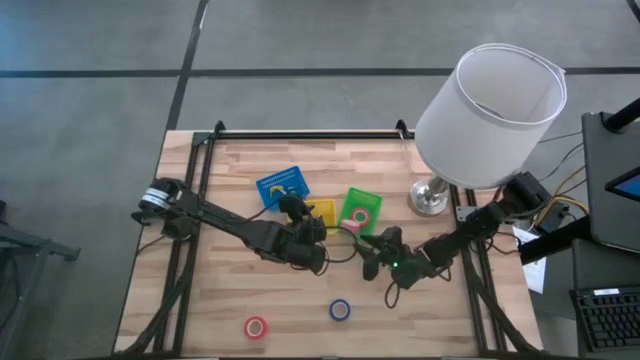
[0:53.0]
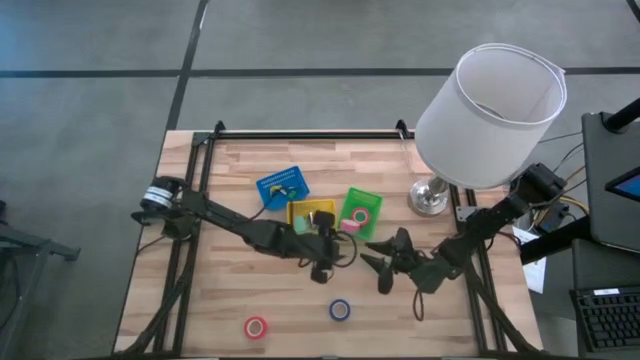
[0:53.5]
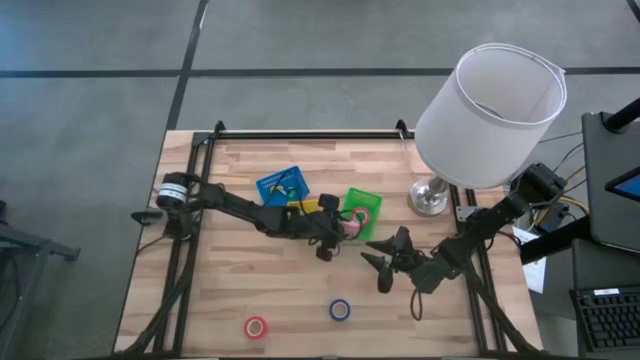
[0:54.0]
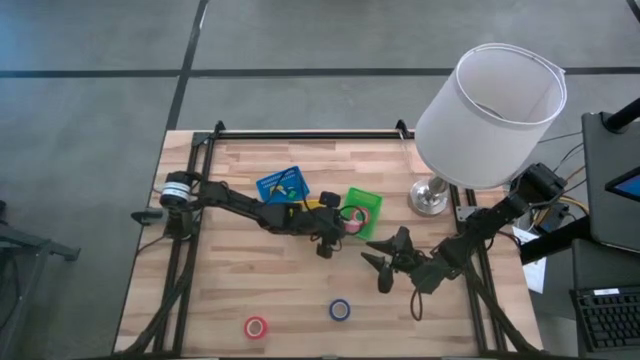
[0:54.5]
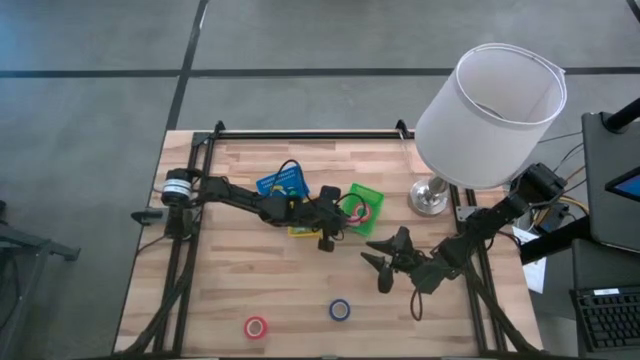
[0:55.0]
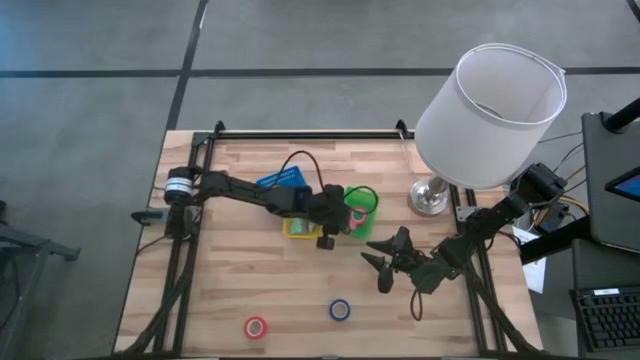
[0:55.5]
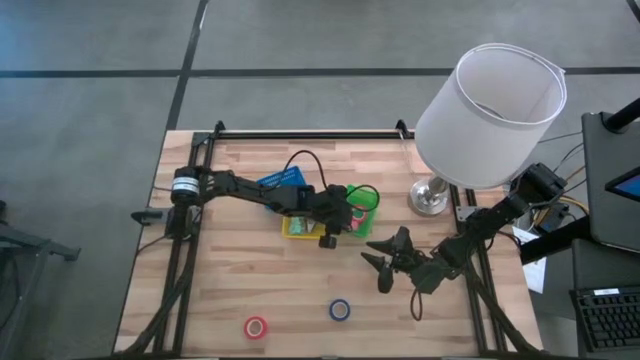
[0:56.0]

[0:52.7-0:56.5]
Task: Pick and place Stapler, Stapler remover, tape
Adjust the pink tape

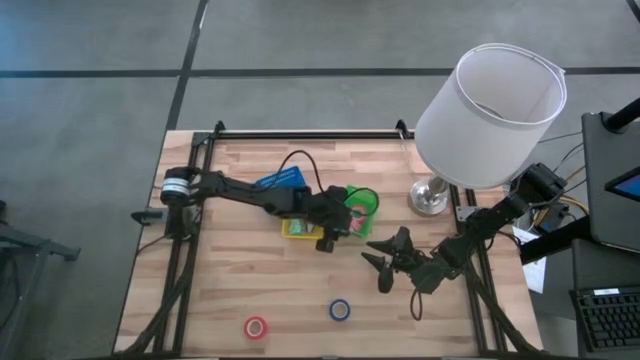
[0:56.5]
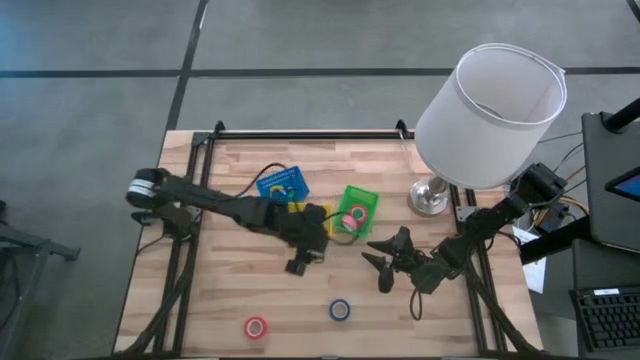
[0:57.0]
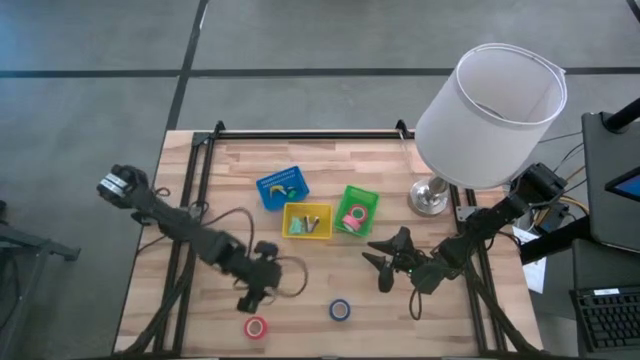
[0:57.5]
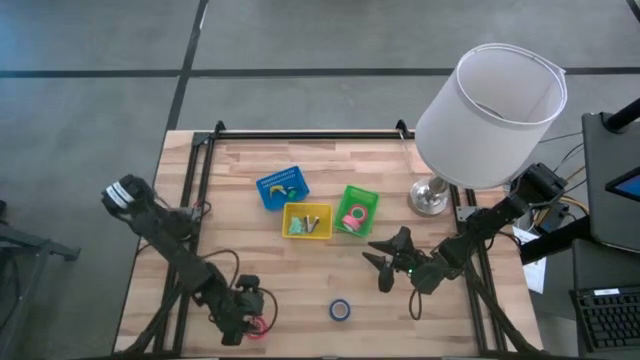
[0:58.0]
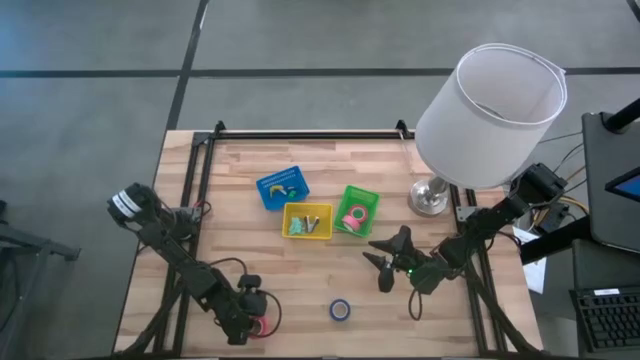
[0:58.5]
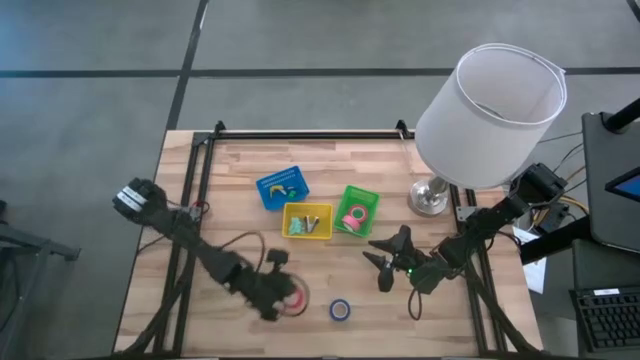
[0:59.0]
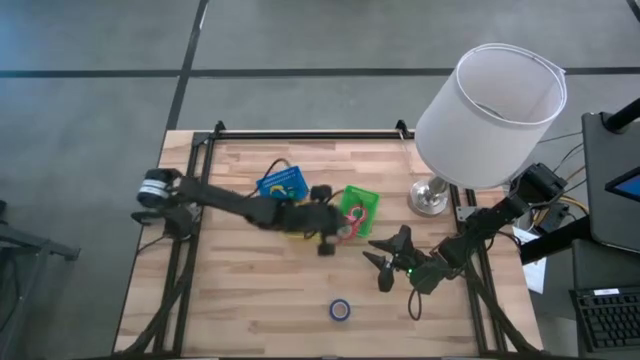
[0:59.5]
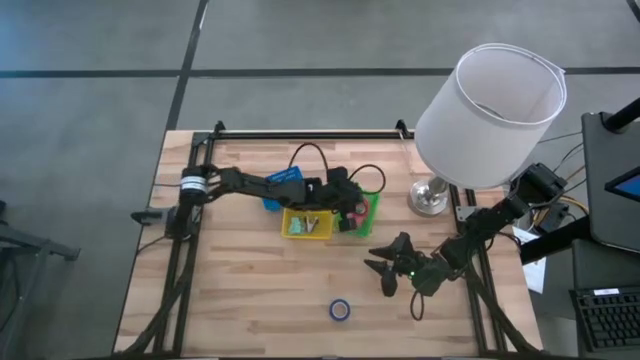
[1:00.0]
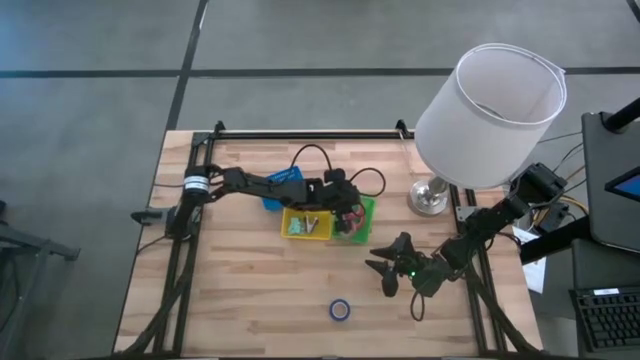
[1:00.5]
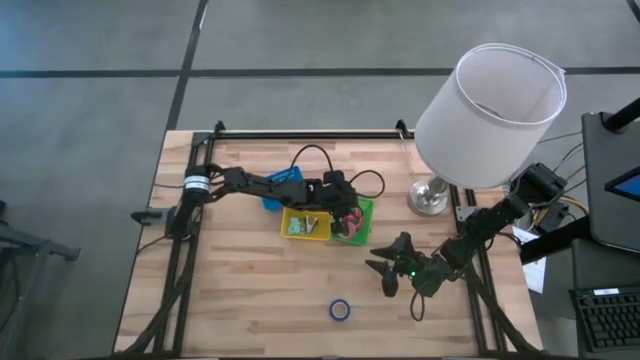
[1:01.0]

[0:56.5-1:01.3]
Put the red tape into the green bin

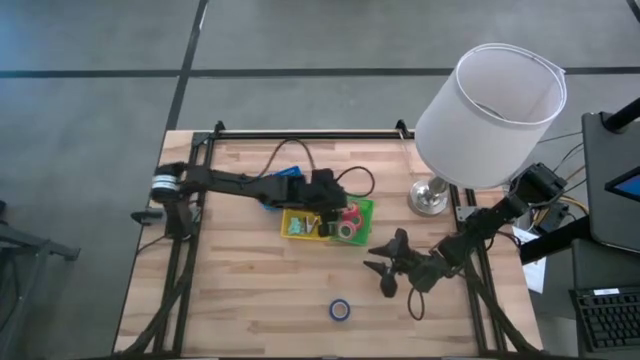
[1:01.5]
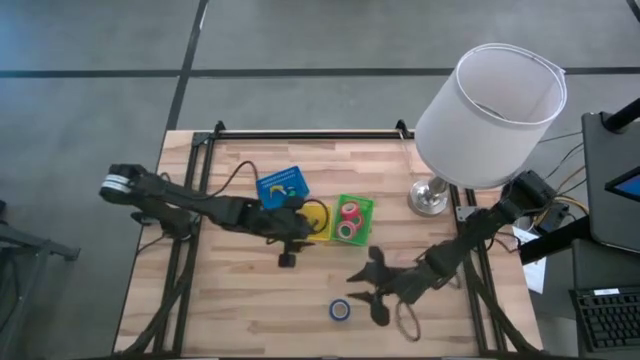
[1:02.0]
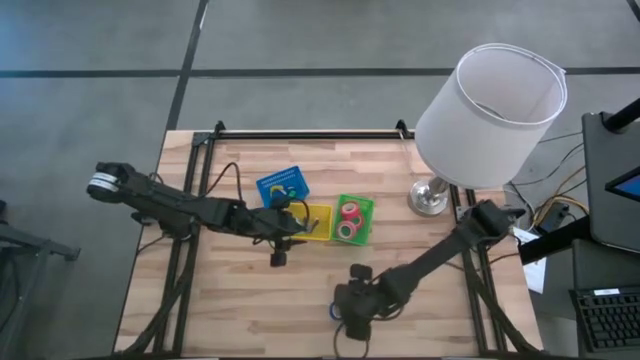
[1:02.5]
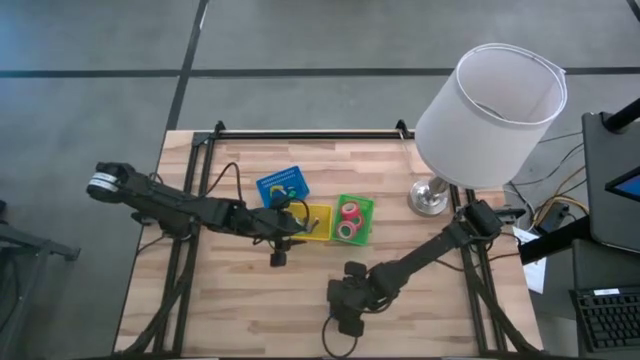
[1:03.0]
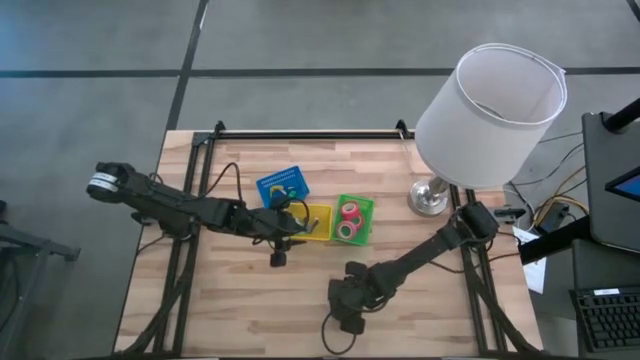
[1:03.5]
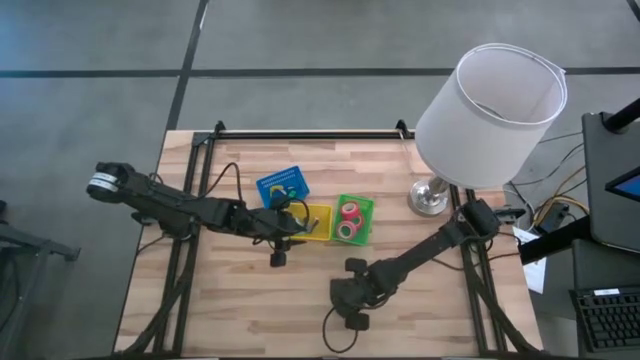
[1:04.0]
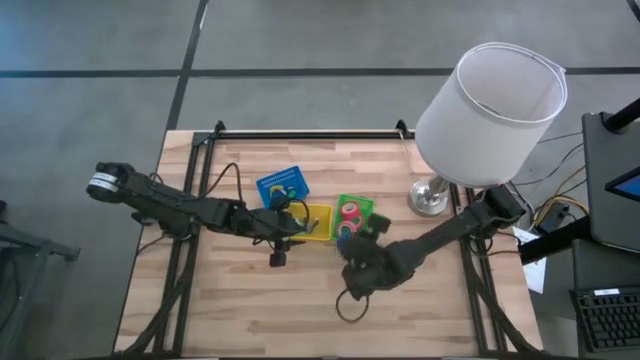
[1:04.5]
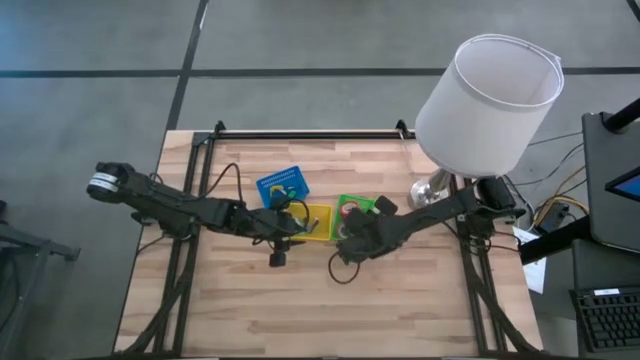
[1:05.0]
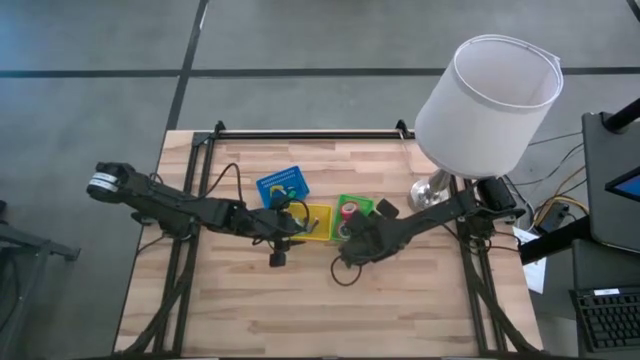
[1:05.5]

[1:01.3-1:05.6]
Put the blue tape into the green bin

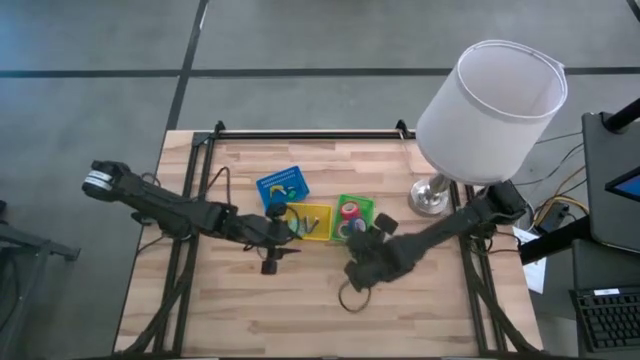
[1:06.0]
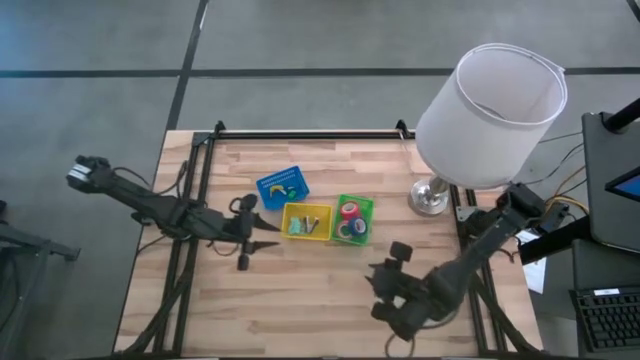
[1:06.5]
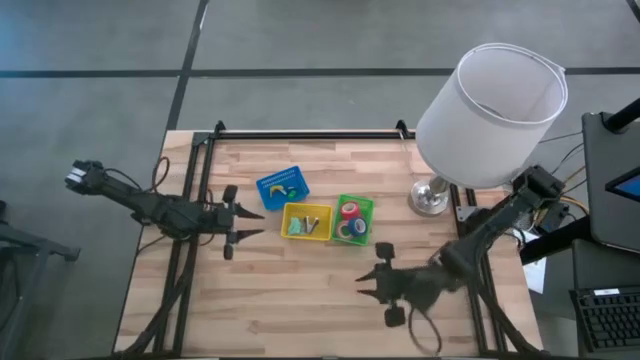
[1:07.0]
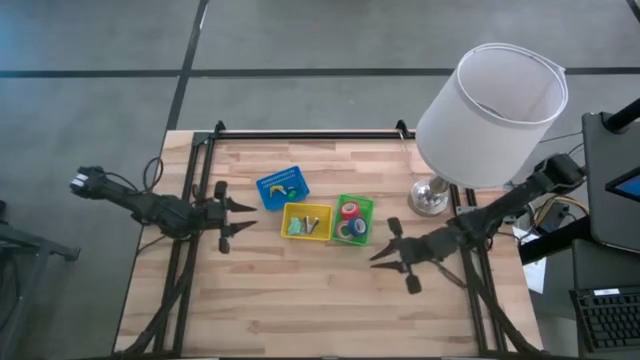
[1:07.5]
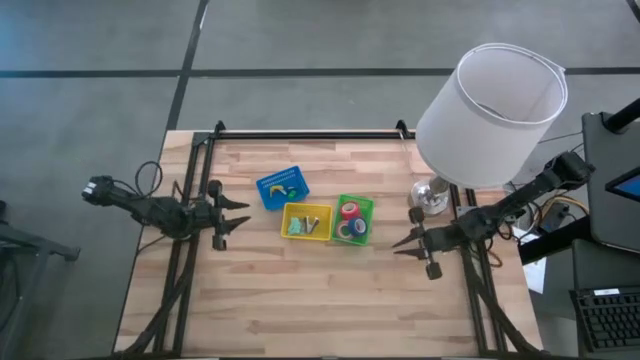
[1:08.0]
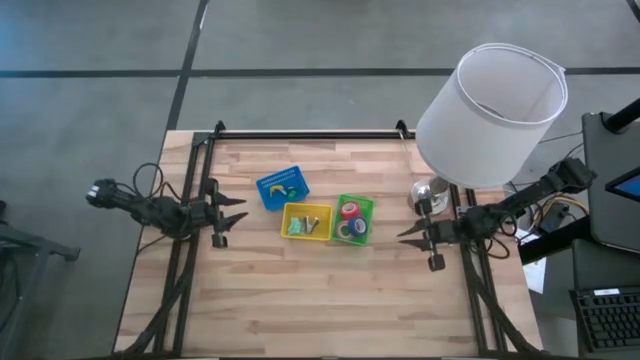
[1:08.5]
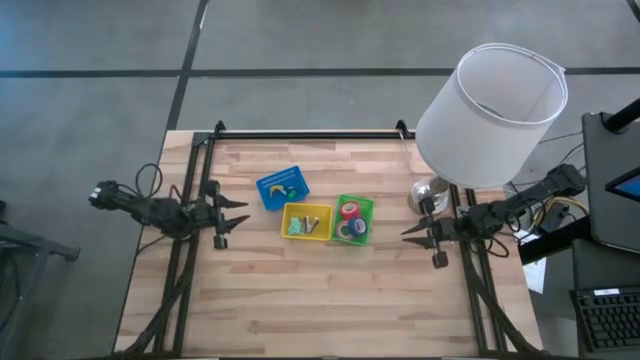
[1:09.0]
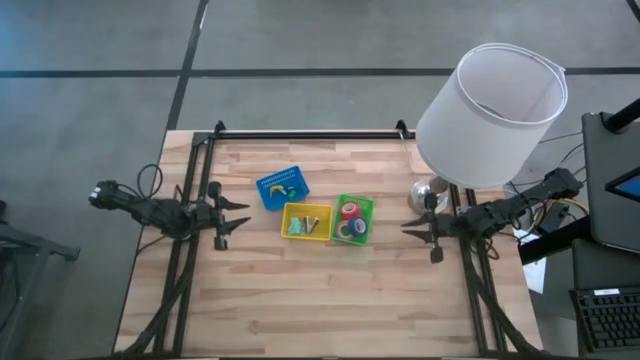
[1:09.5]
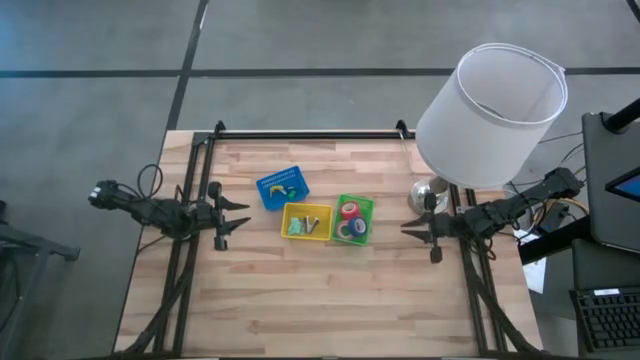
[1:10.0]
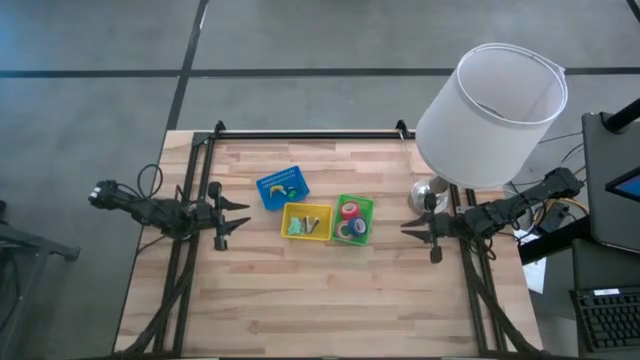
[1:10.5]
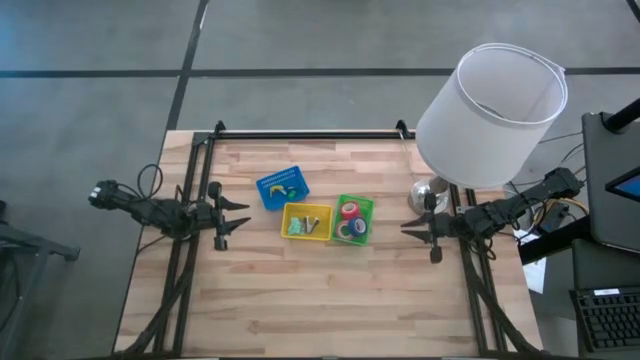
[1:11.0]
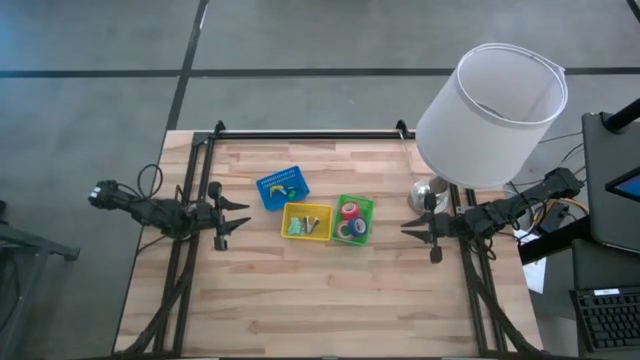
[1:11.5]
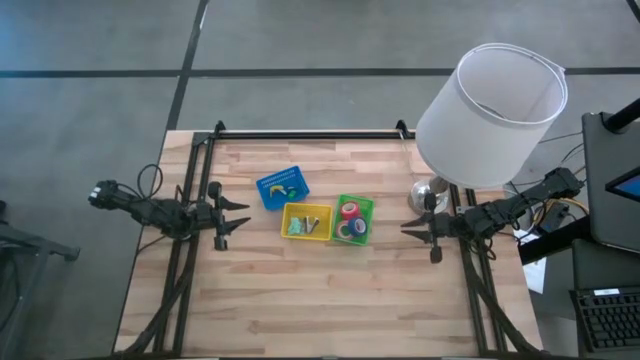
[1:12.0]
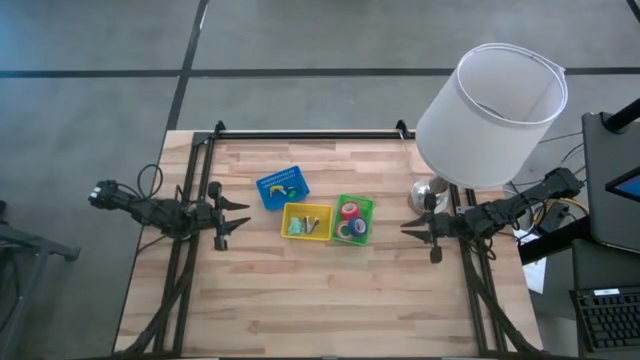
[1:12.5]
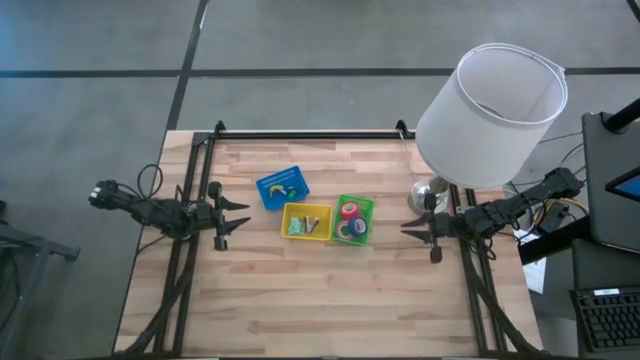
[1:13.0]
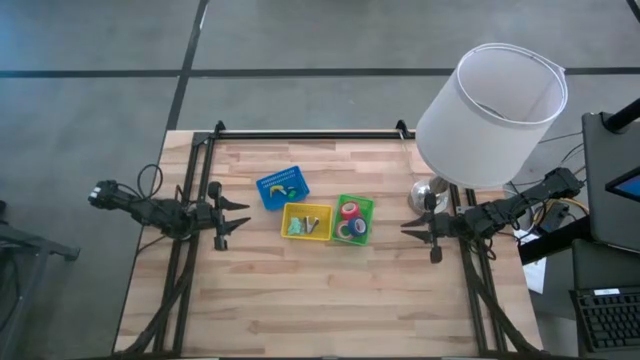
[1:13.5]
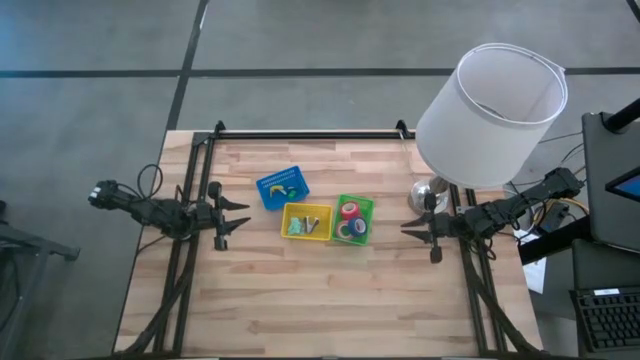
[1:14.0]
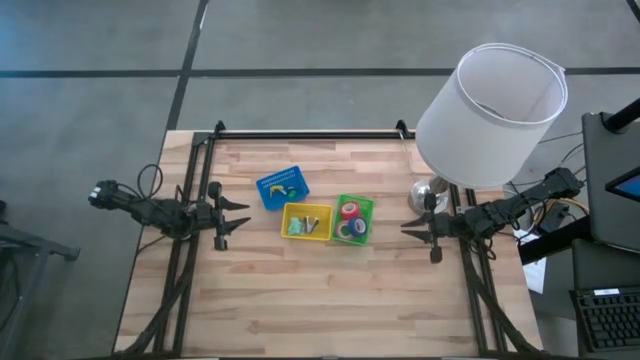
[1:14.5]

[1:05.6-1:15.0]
Return to Home Position
